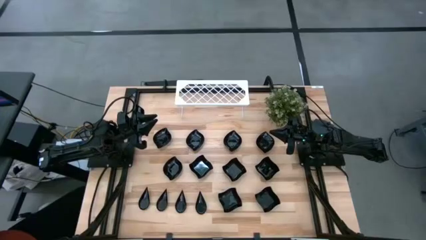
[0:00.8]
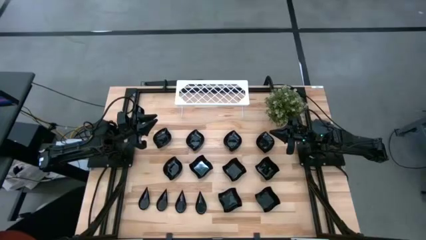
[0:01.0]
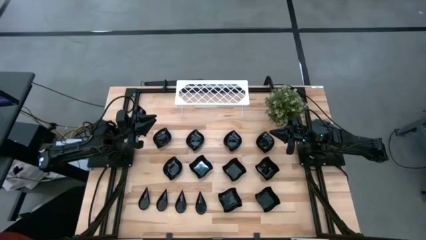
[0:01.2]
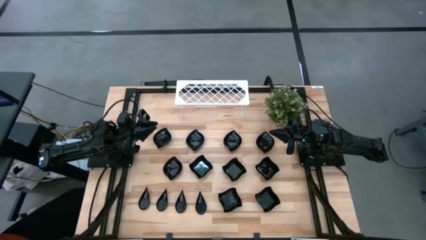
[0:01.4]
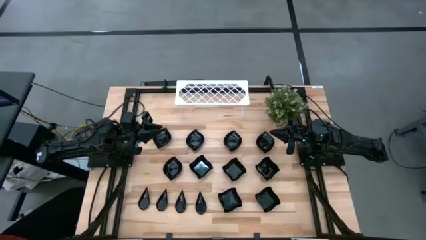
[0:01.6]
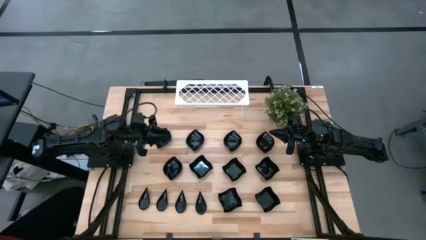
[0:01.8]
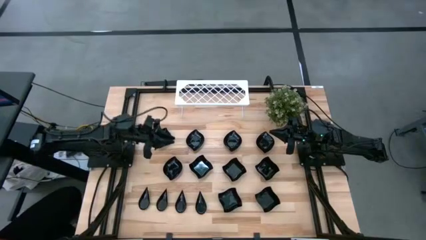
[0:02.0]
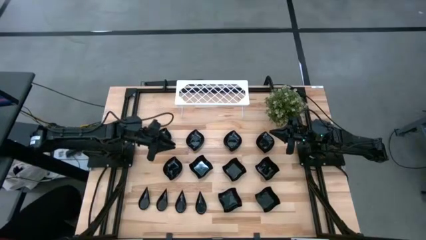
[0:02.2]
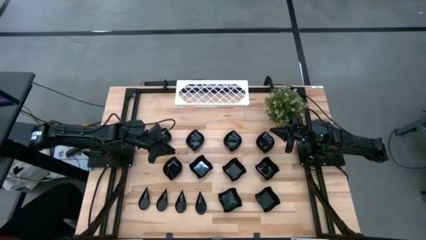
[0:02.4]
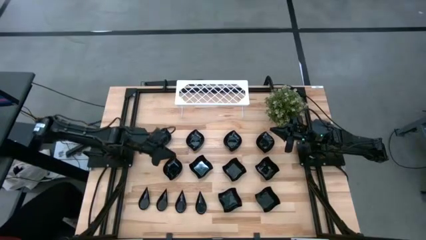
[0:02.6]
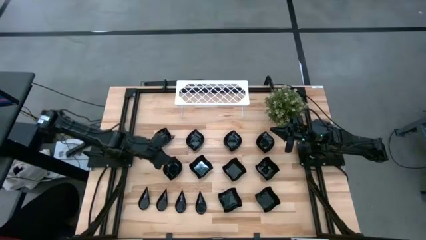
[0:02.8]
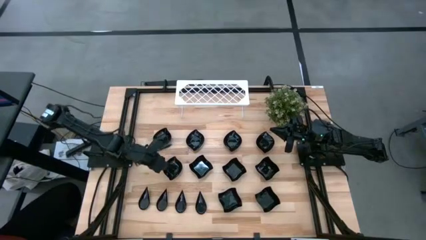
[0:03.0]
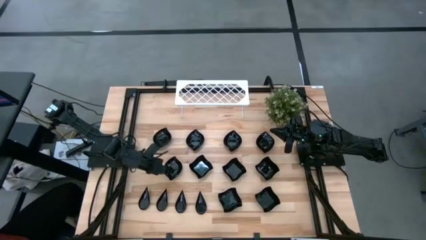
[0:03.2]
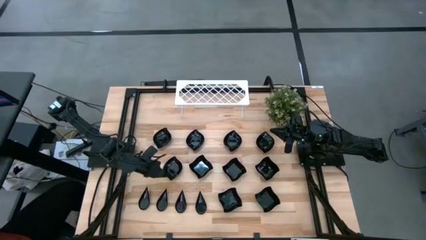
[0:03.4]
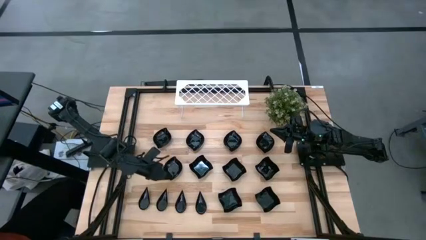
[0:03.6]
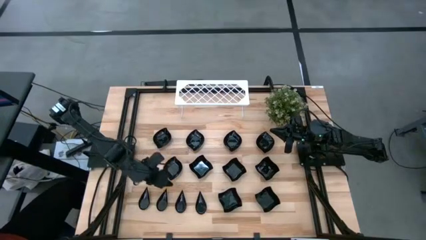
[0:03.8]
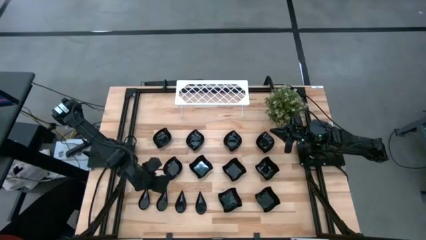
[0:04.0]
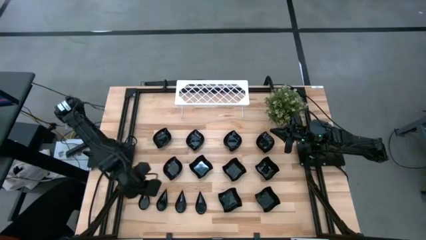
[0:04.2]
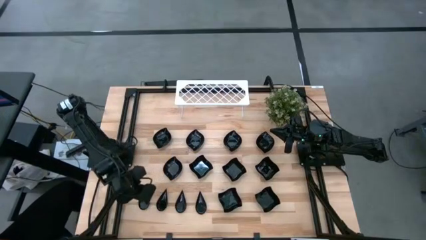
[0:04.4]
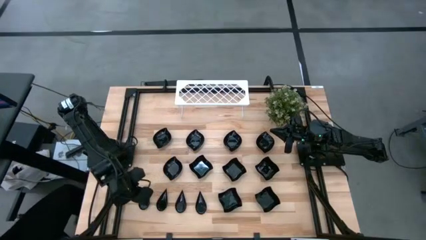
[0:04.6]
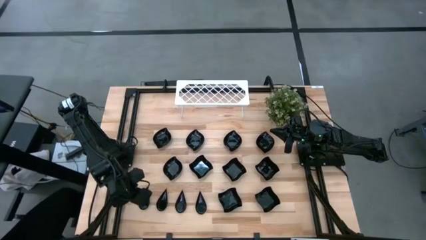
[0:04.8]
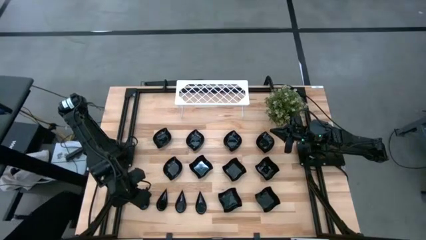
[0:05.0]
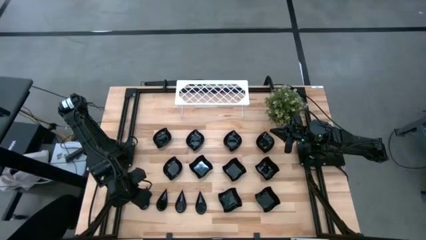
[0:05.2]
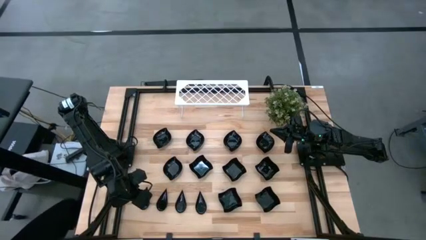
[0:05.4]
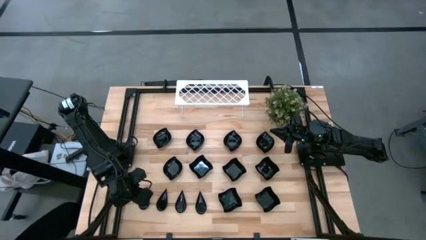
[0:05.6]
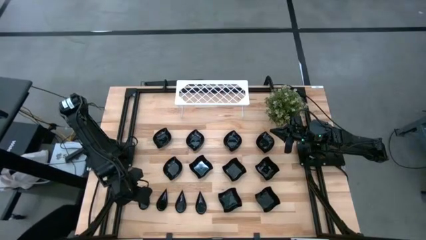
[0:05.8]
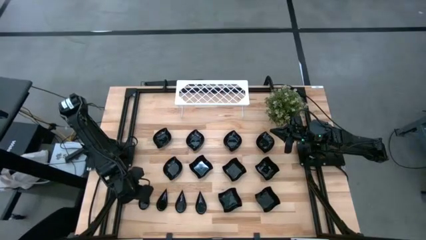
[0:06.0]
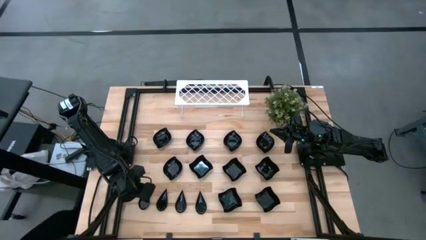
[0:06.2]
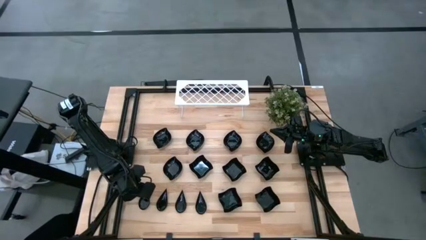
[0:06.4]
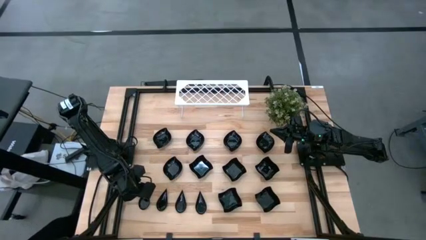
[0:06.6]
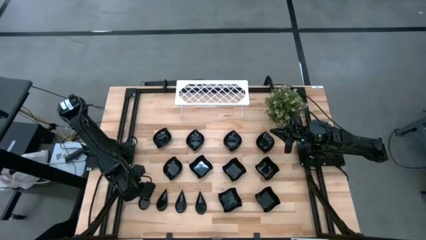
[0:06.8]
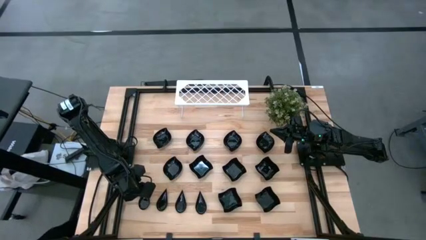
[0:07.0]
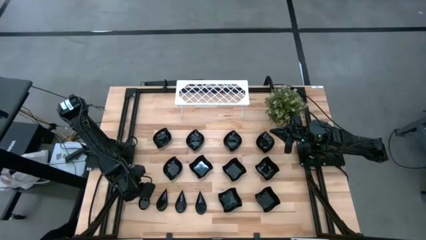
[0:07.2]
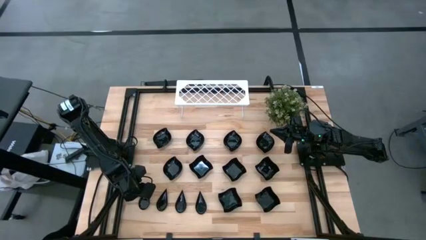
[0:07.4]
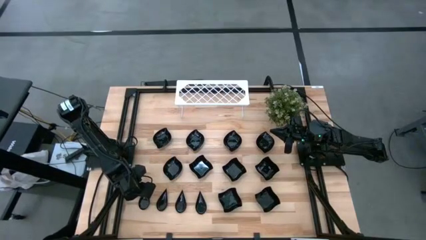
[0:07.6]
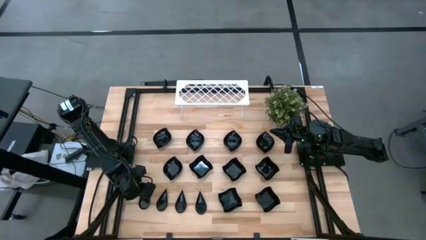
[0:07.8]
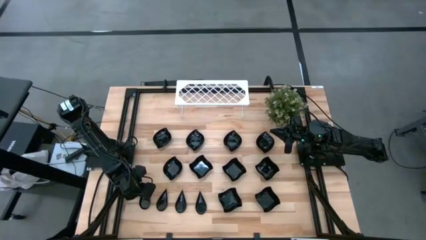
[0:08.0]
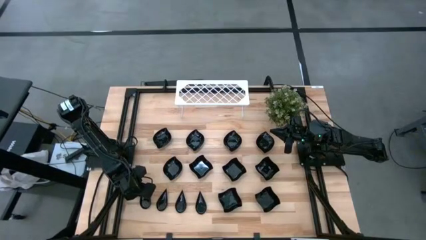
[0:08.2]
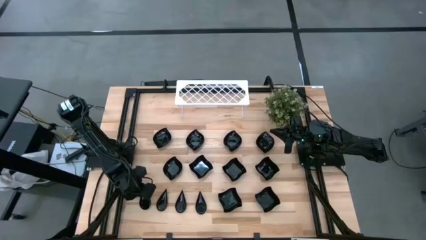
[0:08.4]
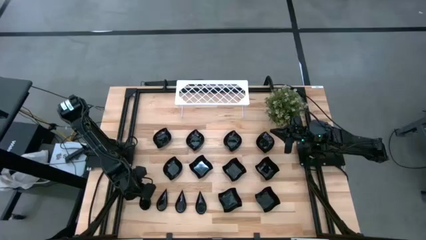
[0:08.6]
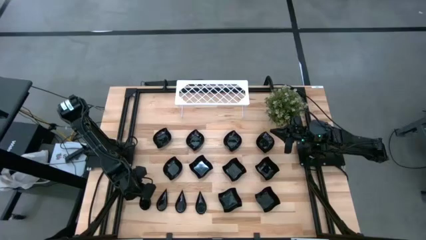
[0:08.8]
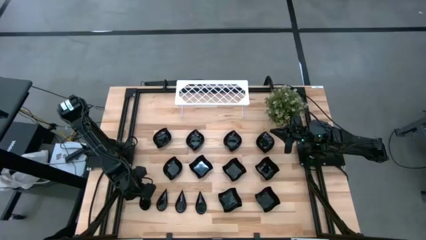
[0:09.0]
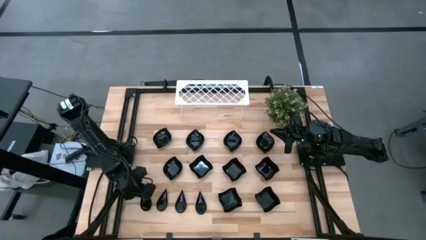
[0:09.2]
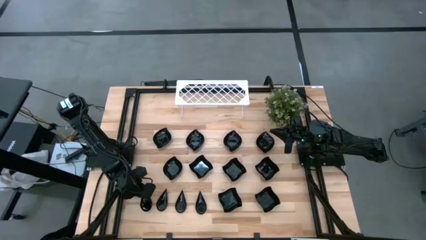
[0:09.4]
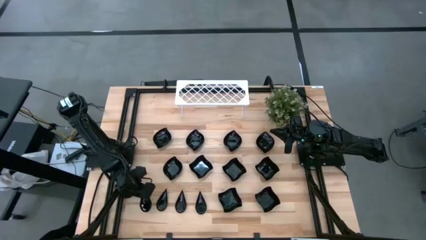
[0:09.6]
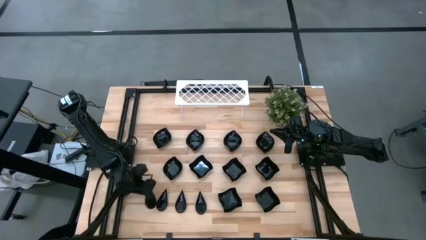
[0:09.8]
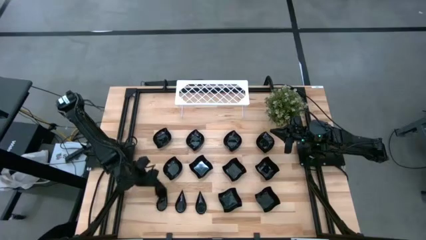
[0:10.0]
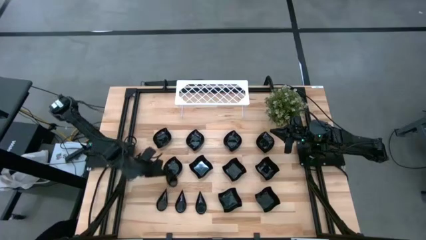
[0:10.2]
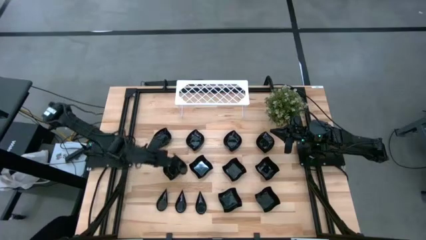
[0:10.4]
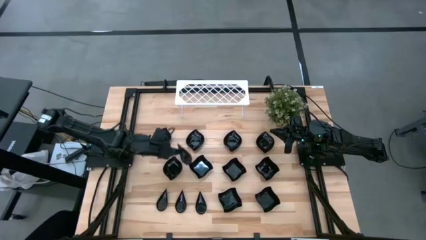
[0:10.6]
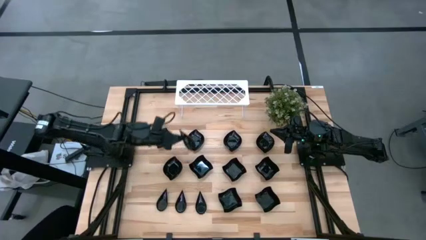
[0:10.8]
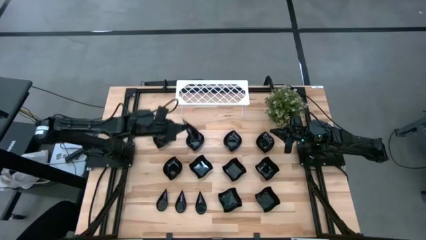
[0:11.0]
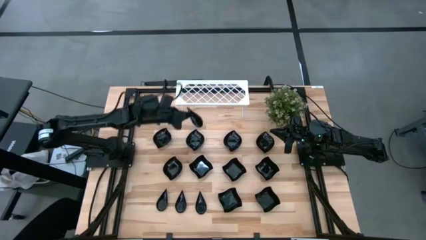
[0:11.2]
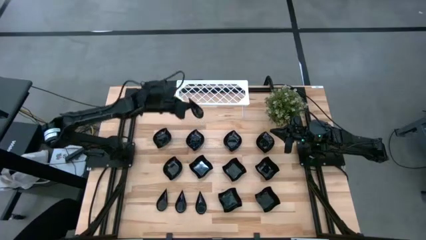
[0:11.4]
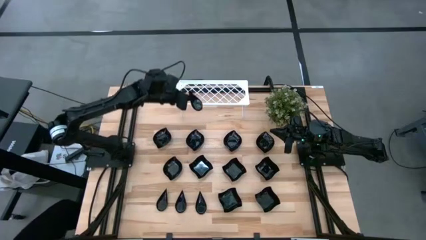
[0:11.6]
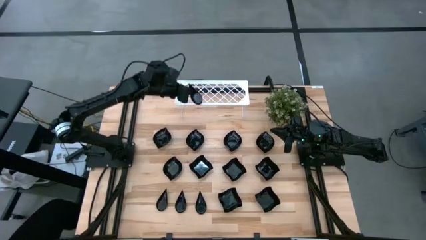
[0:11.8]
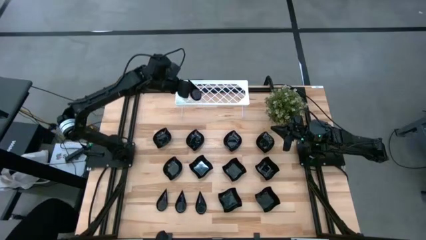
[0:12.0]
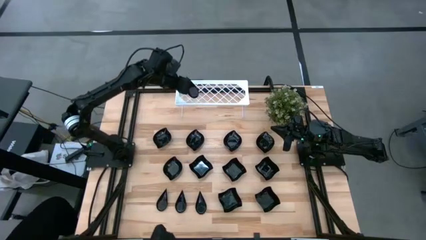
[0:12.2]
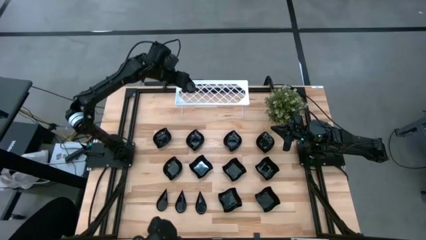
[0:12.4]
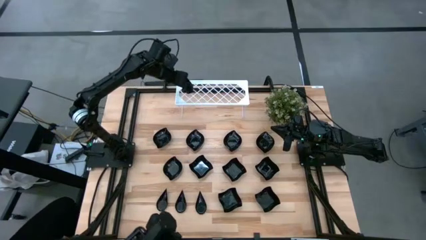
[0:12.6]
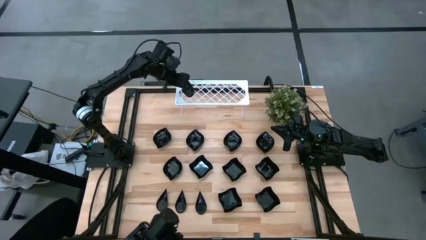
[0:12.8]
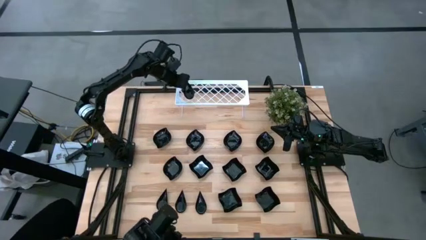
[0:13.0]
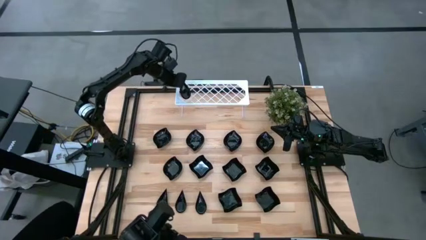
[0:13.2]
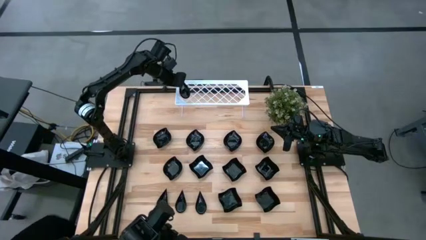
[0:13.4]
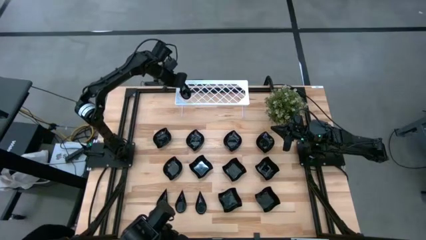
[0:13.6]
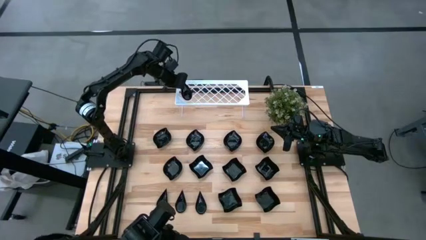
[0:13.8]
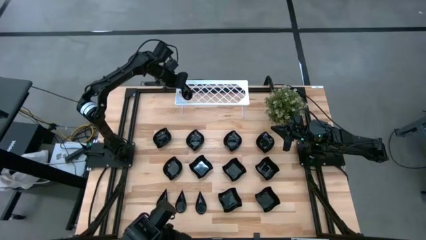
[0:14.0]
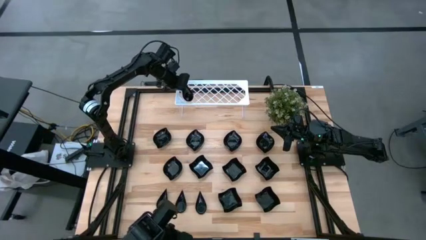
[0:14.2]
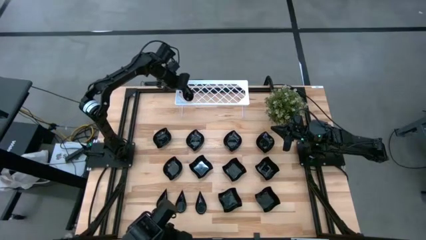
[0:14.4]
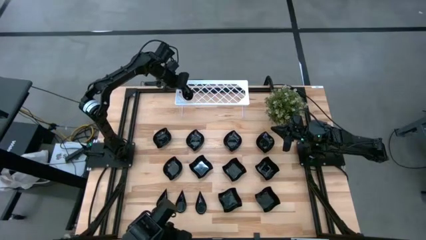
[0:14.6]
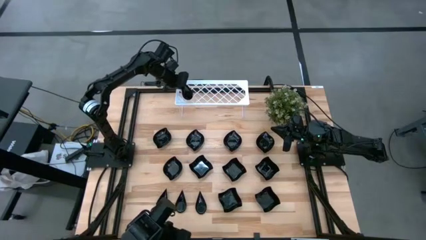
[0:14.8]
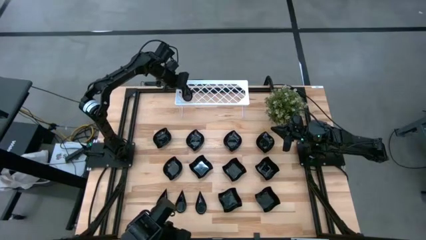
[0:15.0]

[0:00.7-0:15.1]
Task: Pick & Place Mini shaped plates
Put the black drop shaped plate on the shelf
